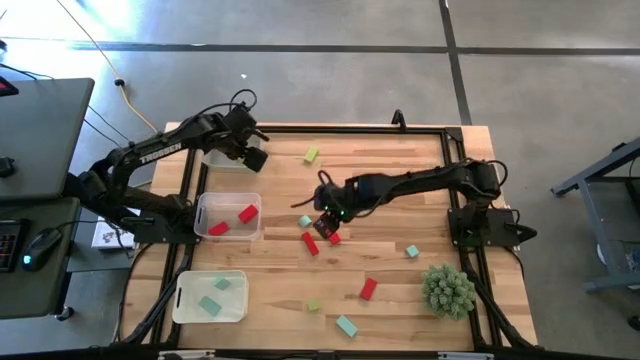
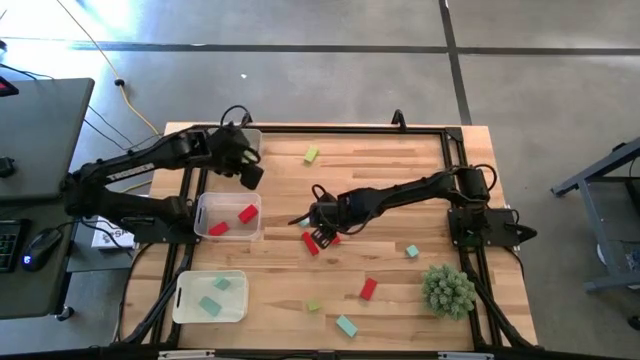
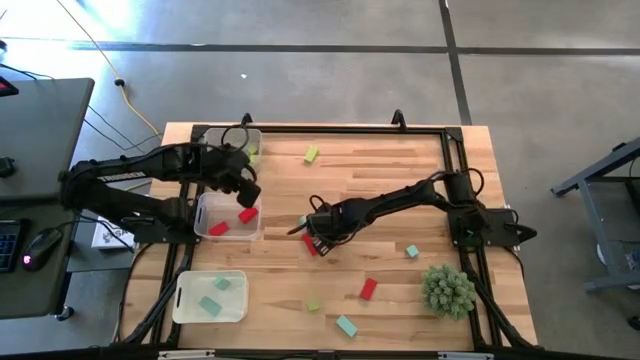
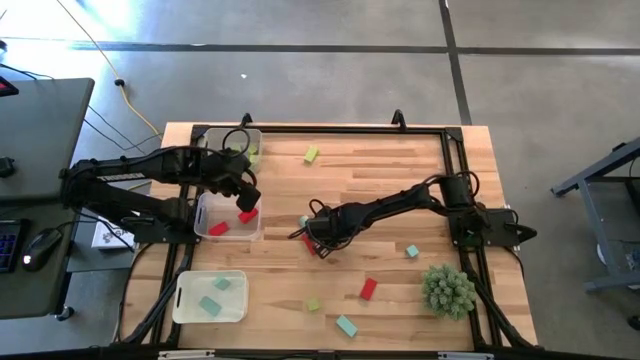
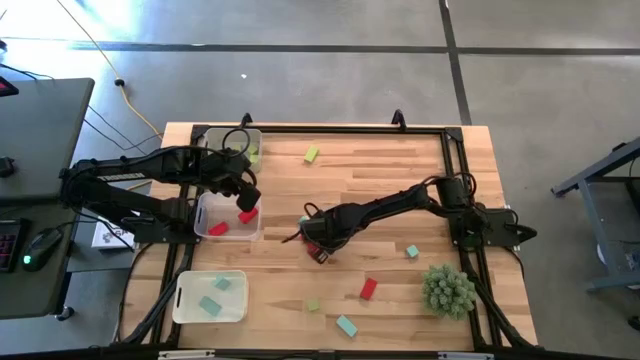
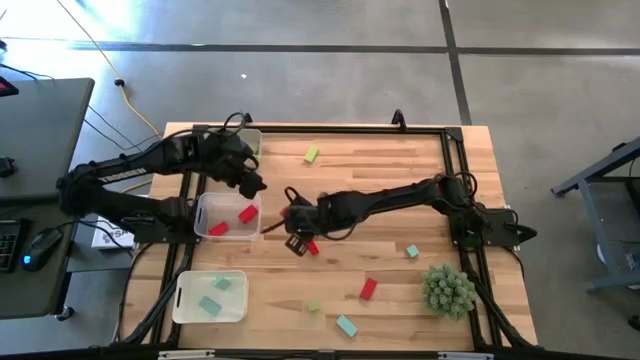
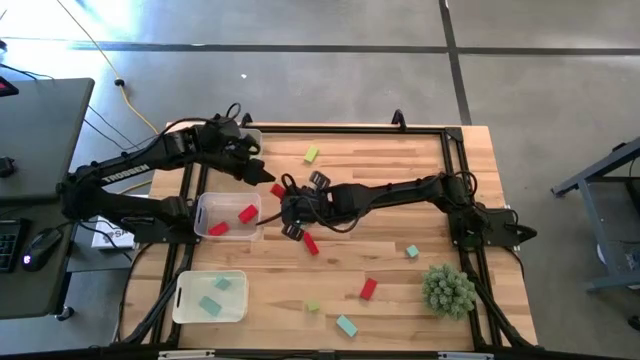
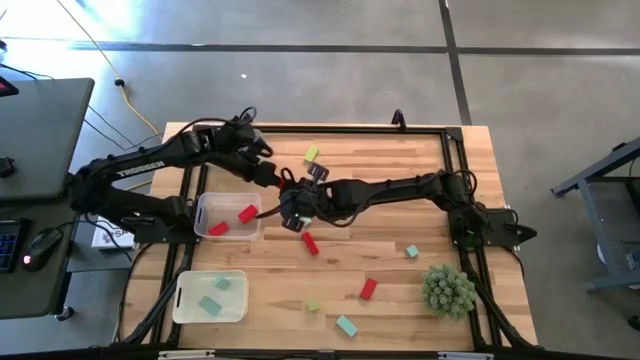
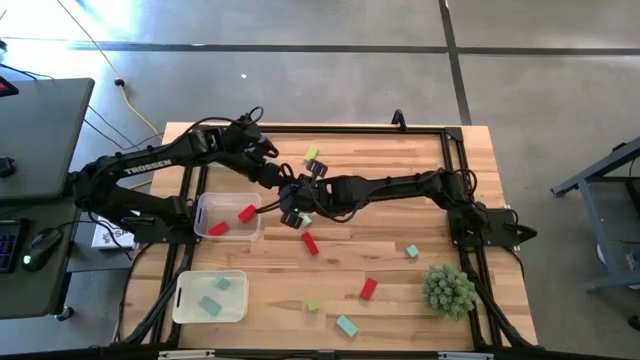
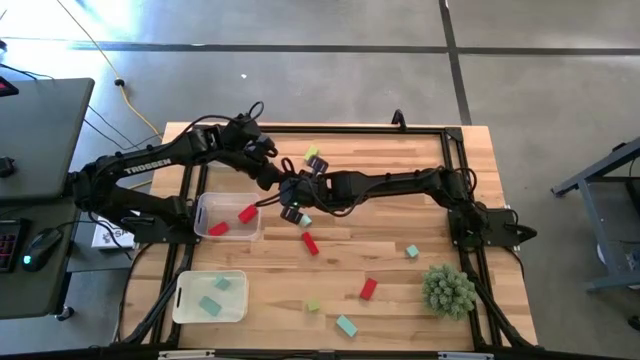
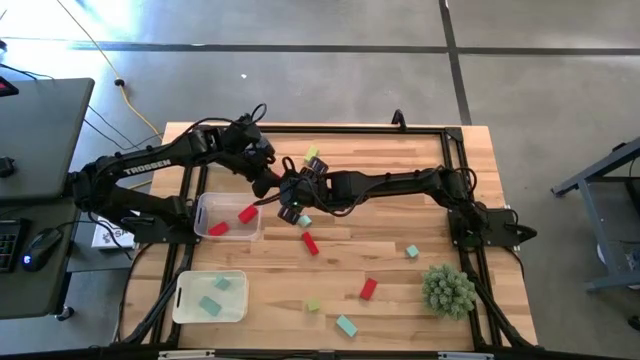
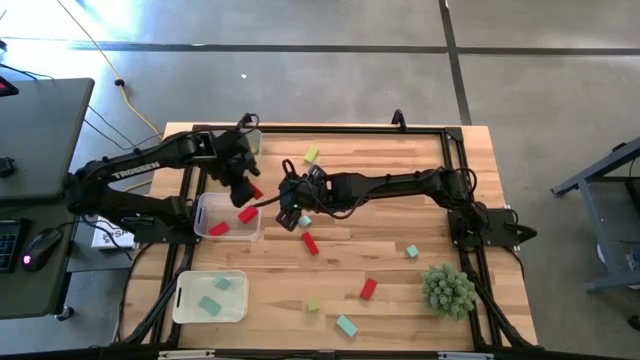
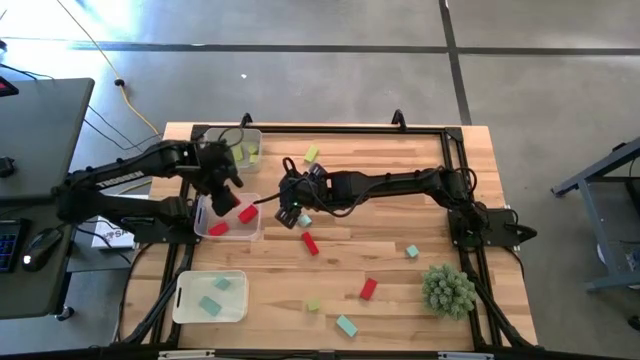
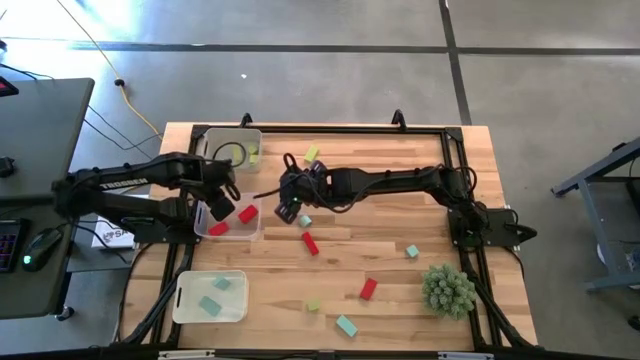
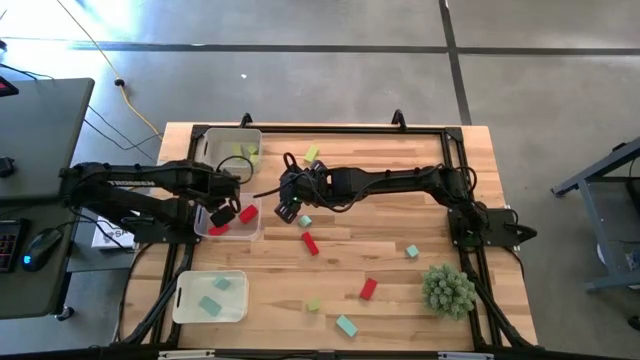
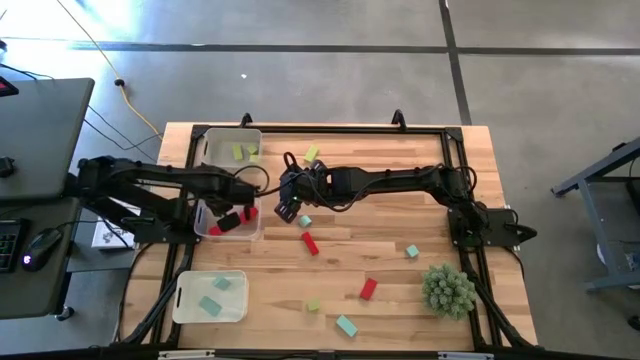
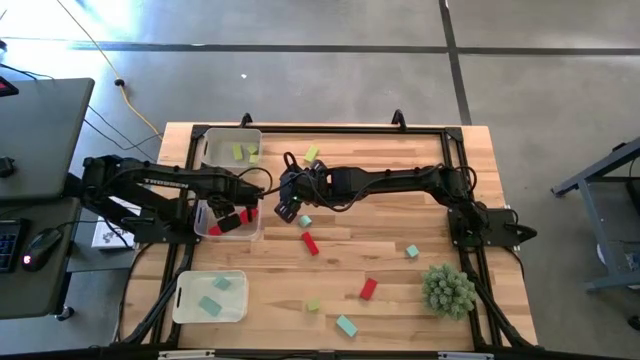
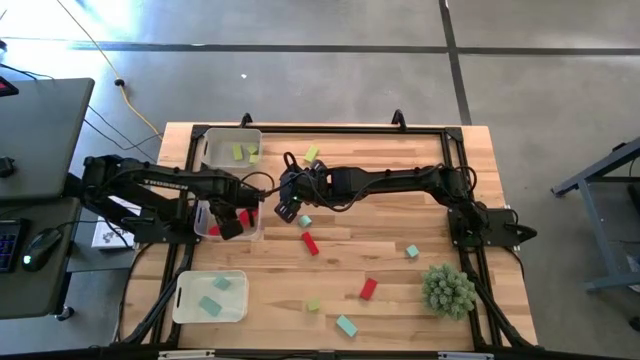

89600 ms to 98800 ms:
Task: Sort & place blocks by color
Put the red block into the transparent bin

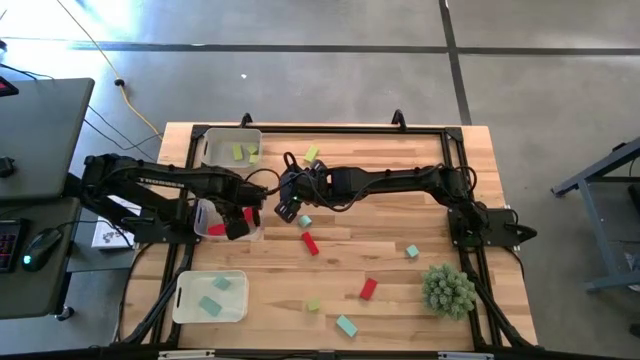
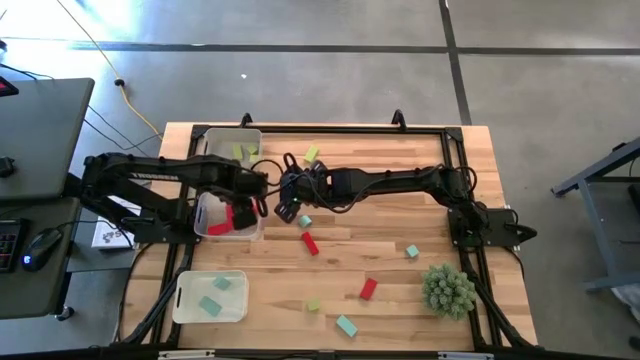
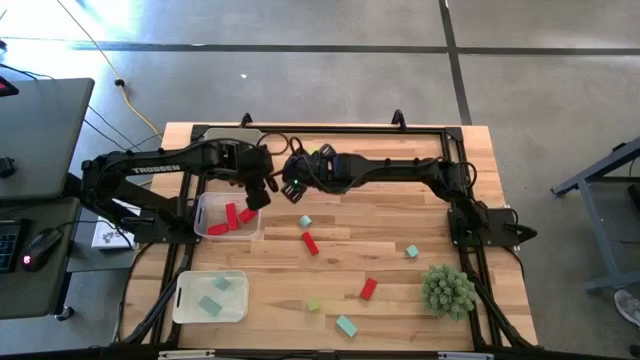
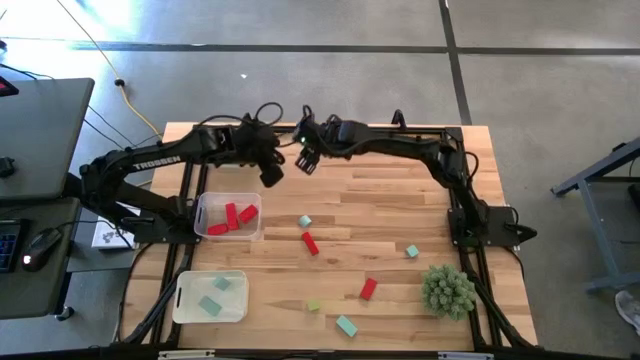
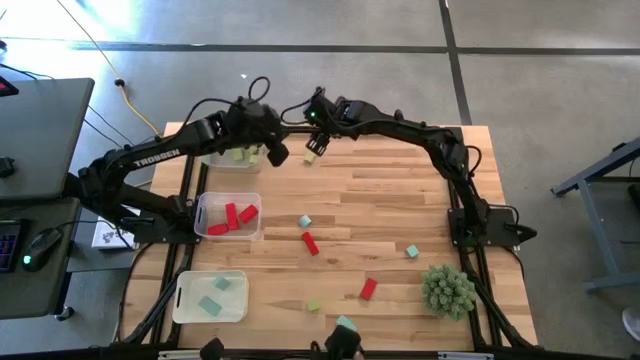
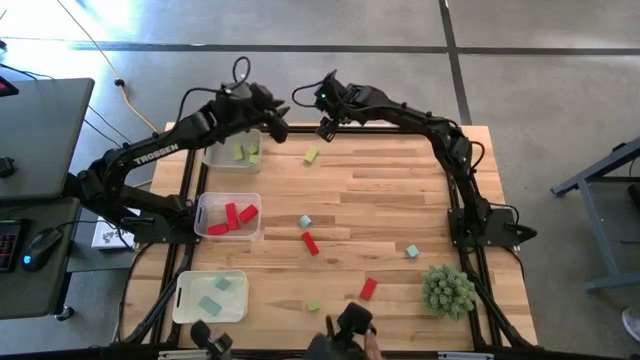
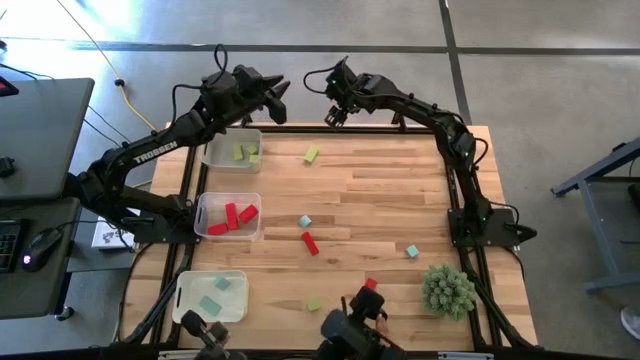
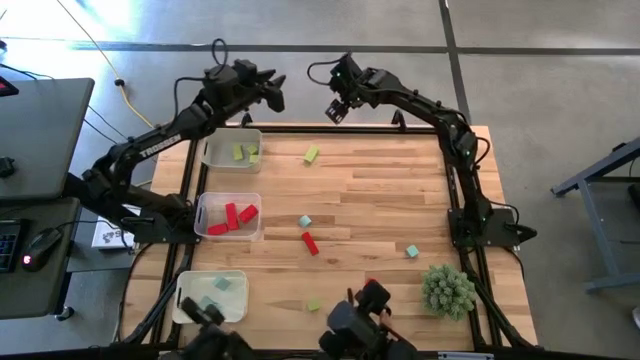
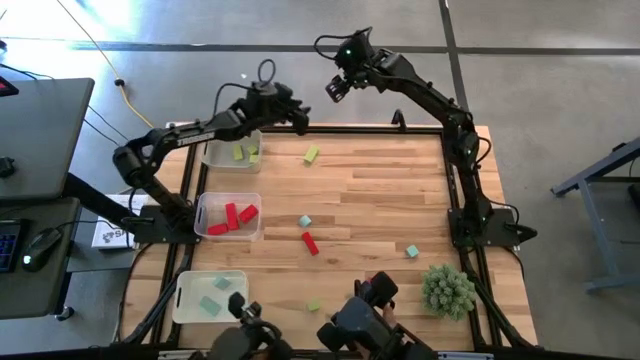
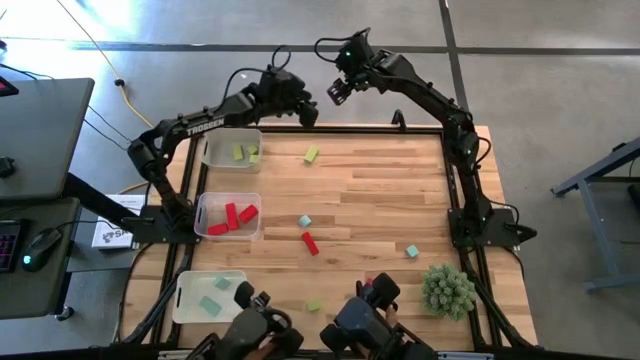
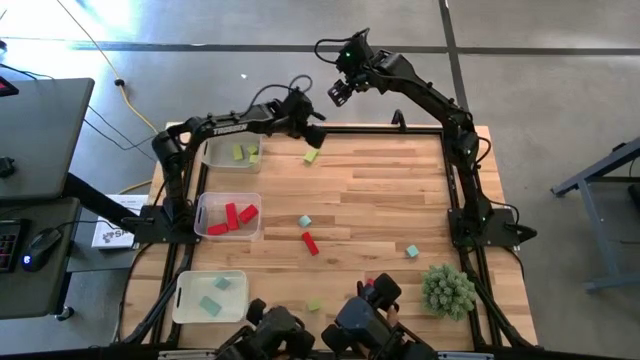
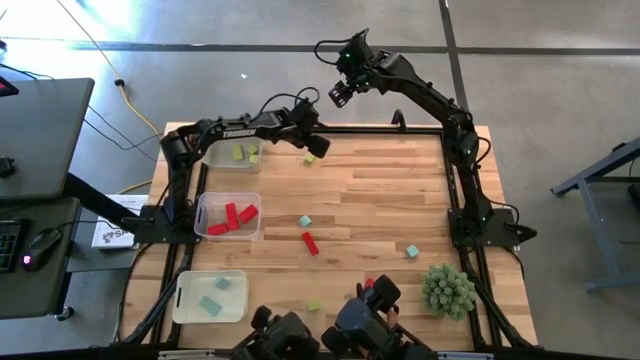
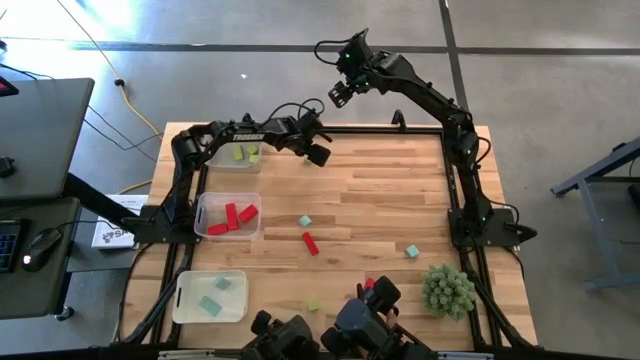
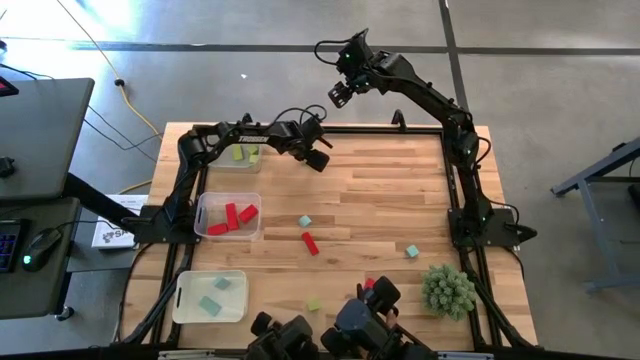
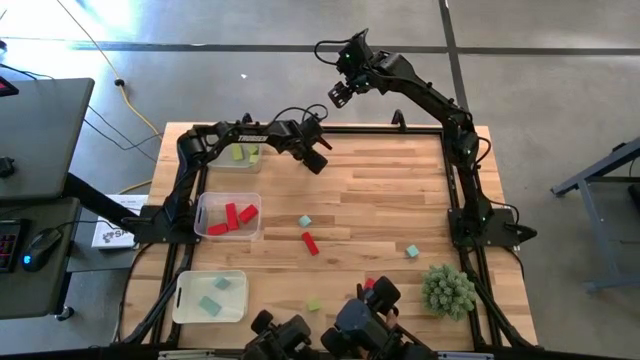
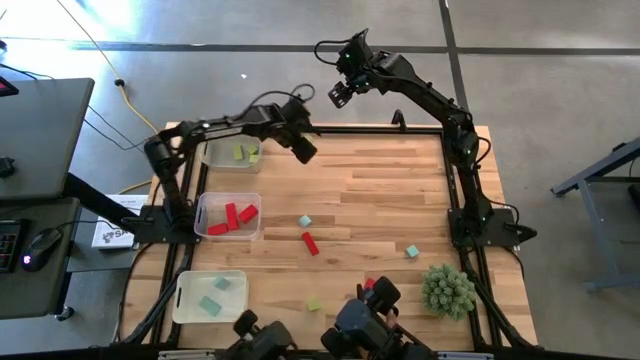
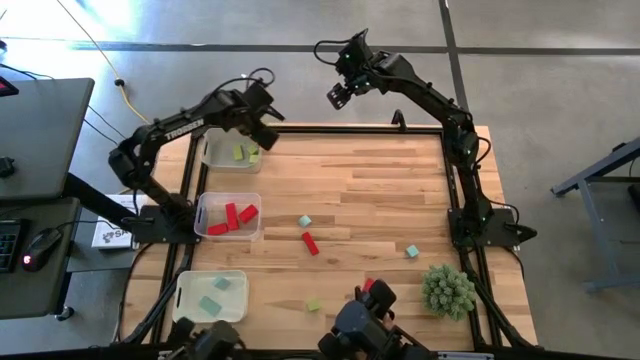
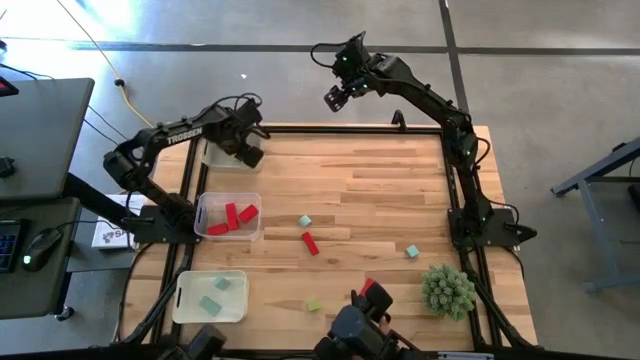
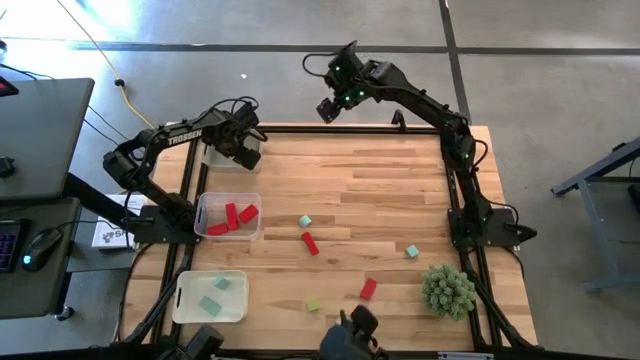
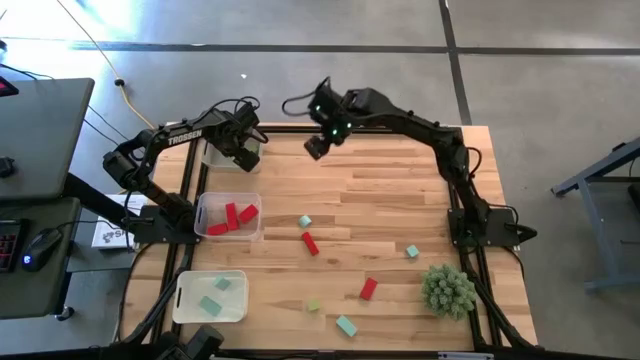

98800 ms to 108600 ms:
Put the top light green block into the gray bin

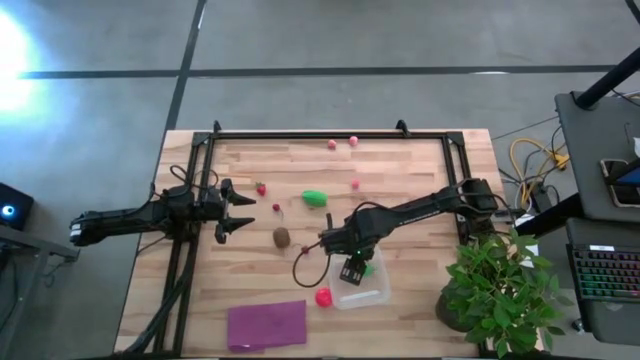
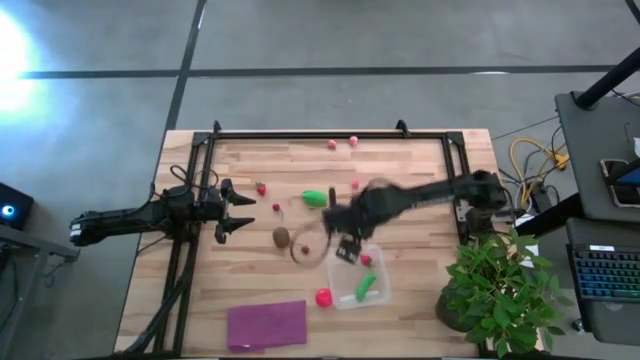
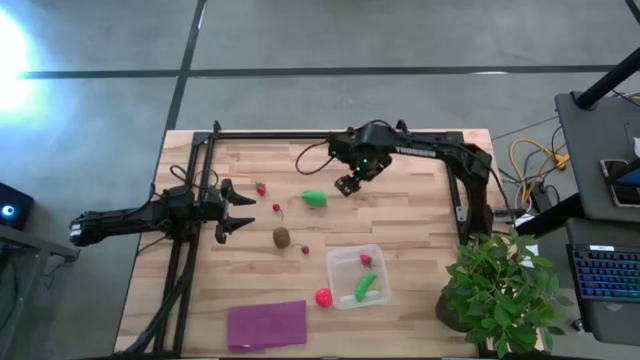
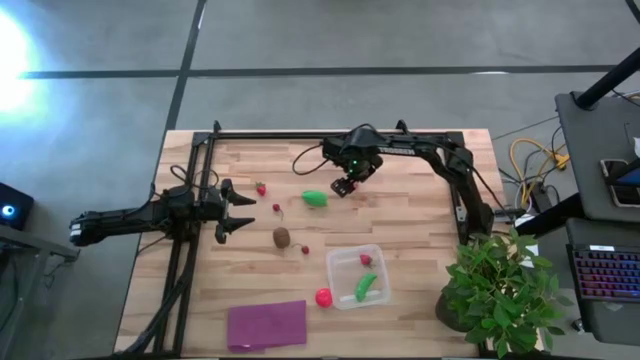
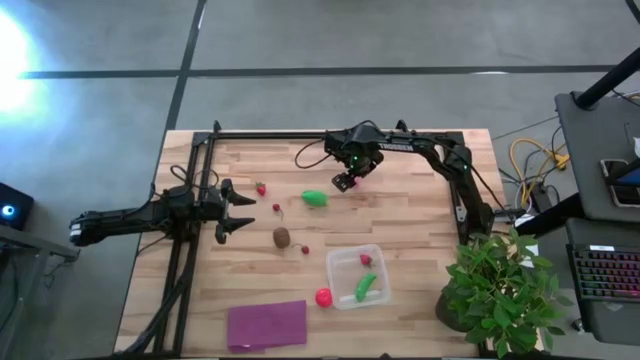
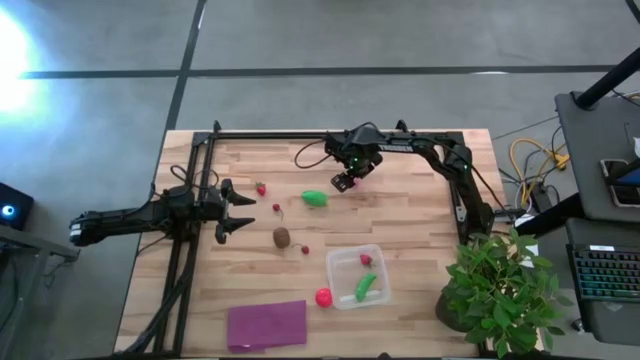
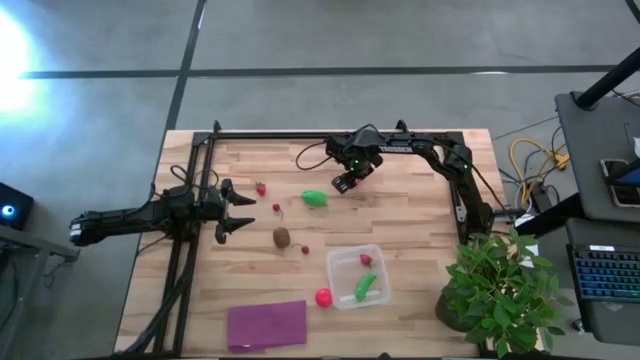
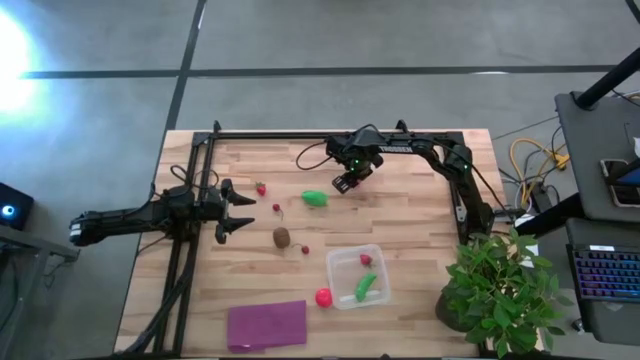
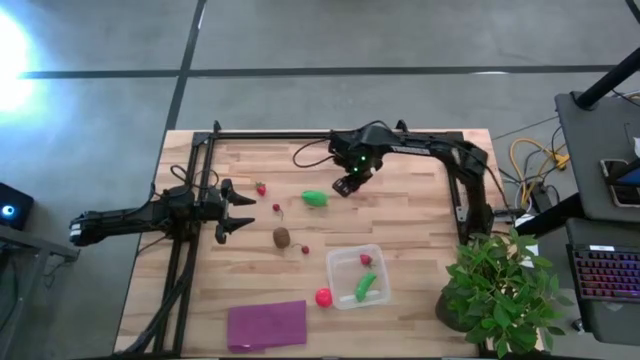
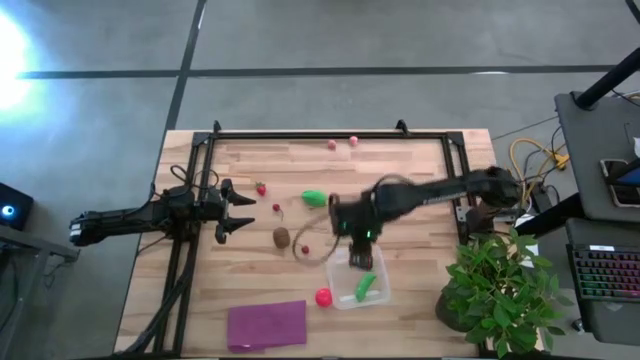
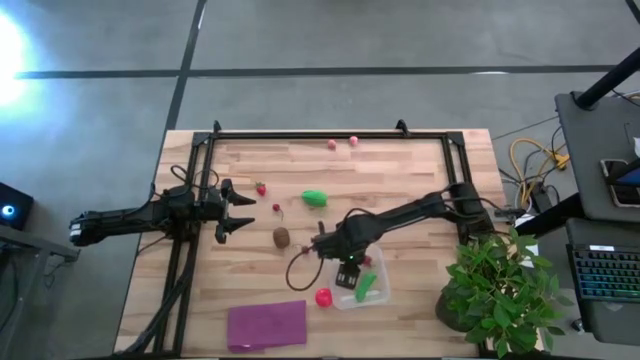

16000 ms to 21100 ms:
Task: Pick and placing Produce into tupperware
Put the bottom pink peach into the transparent container
